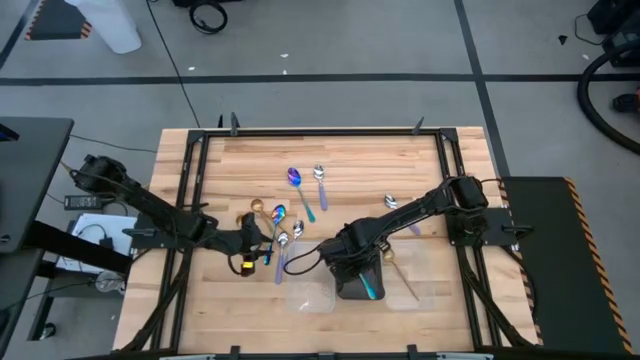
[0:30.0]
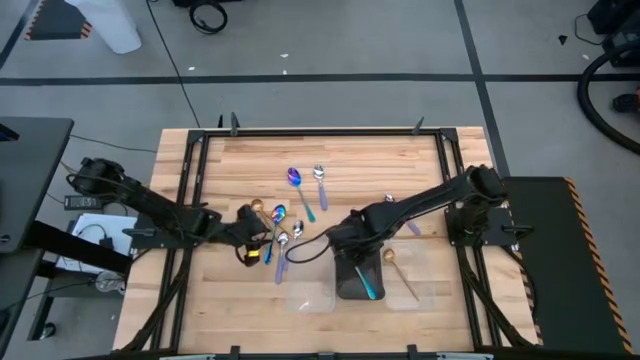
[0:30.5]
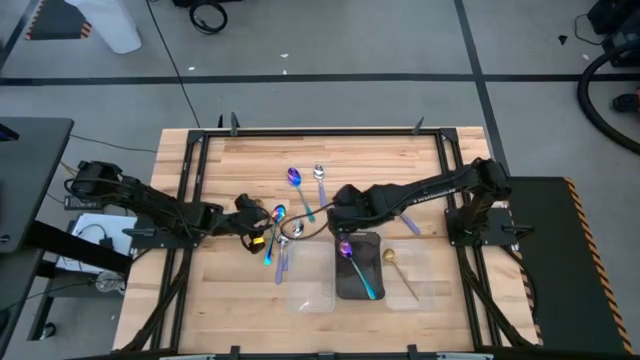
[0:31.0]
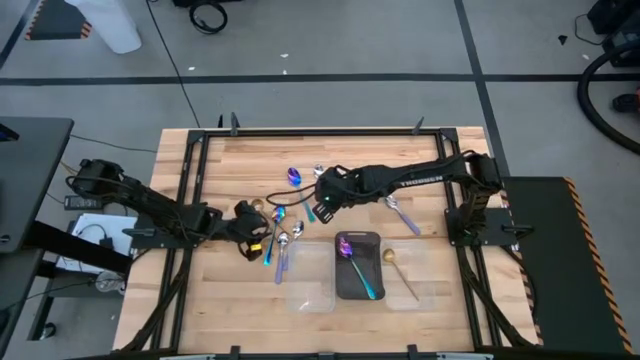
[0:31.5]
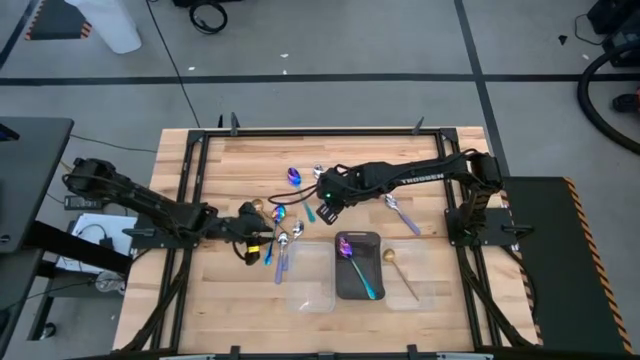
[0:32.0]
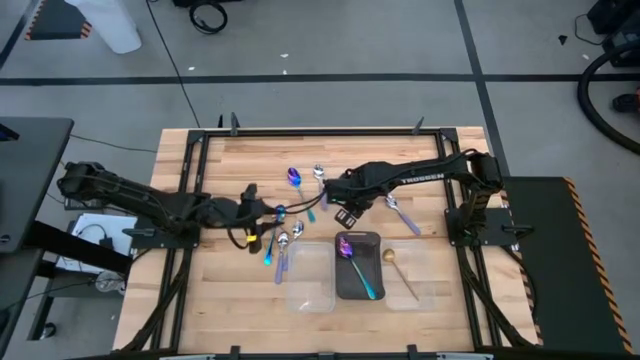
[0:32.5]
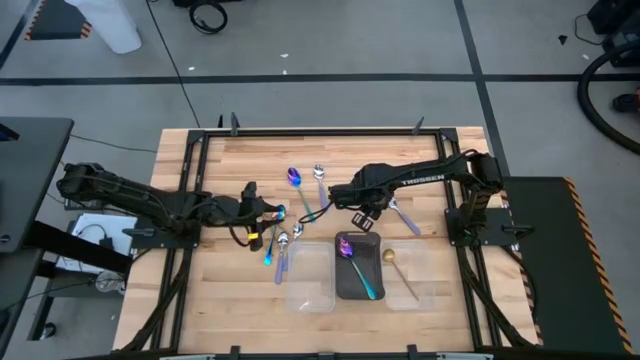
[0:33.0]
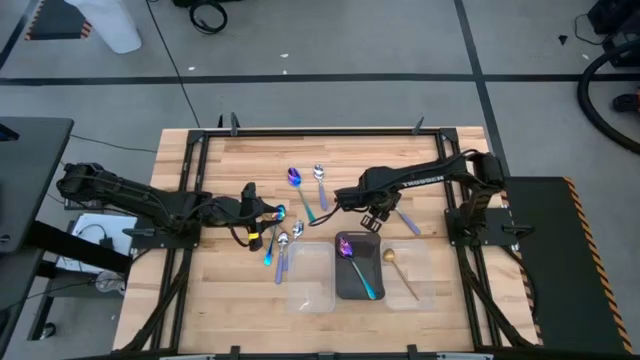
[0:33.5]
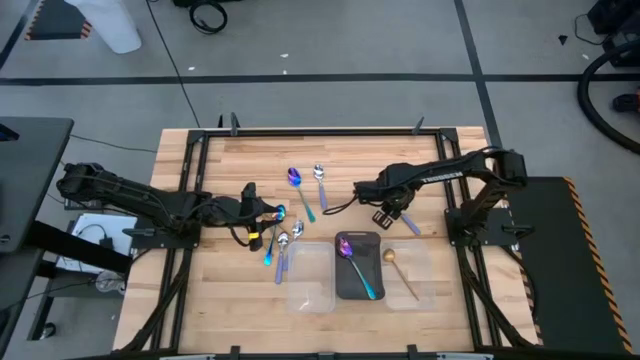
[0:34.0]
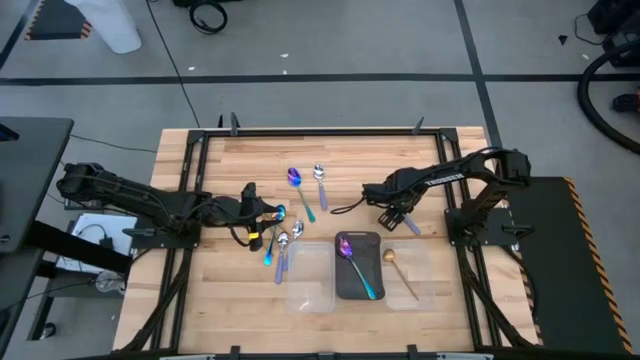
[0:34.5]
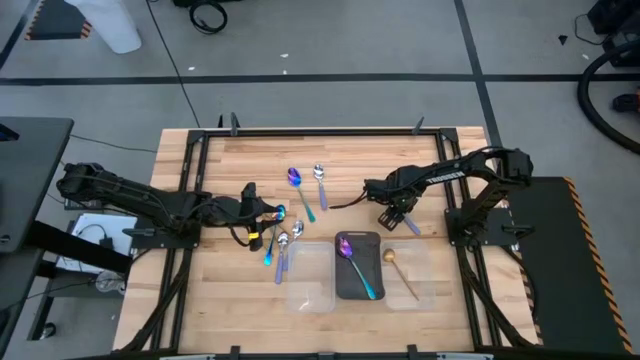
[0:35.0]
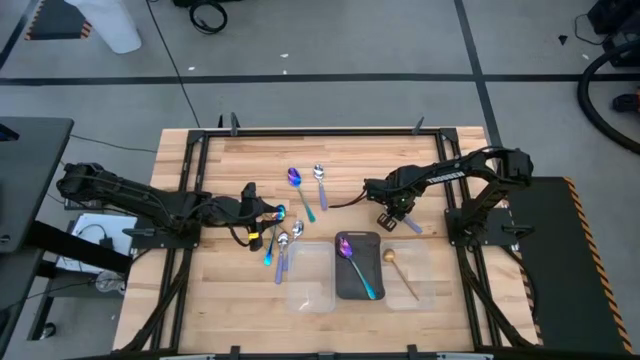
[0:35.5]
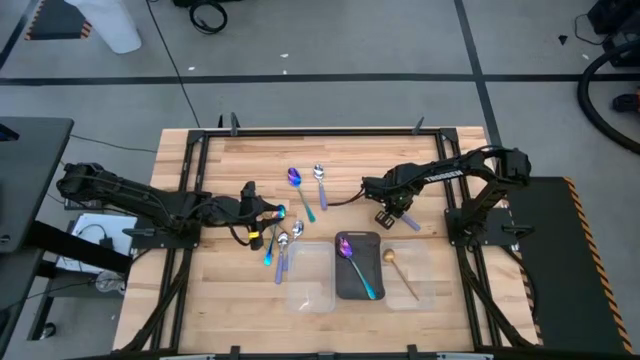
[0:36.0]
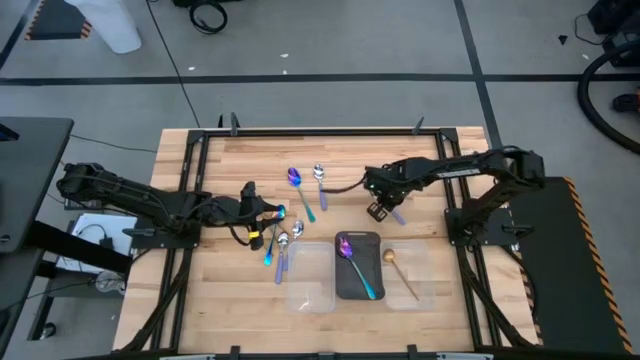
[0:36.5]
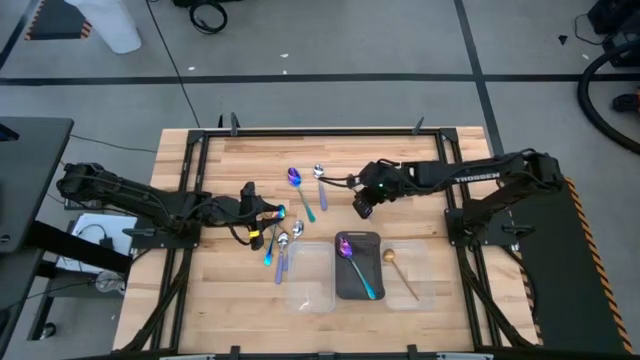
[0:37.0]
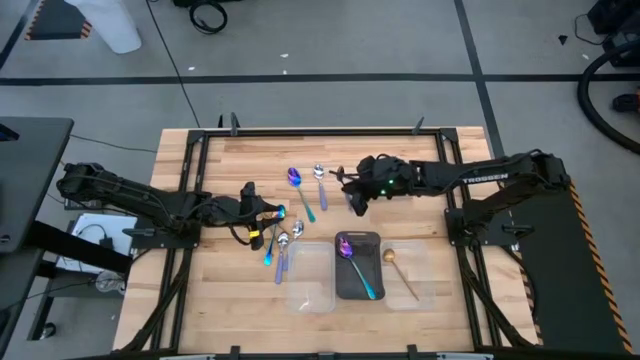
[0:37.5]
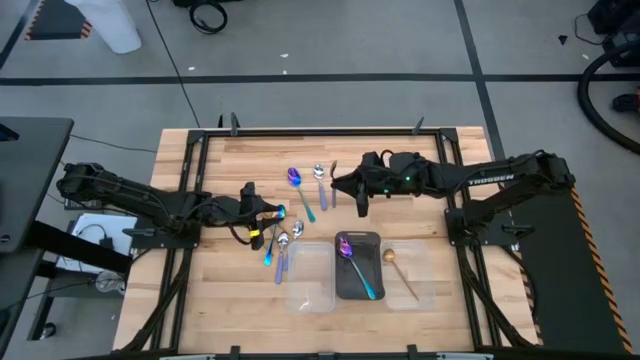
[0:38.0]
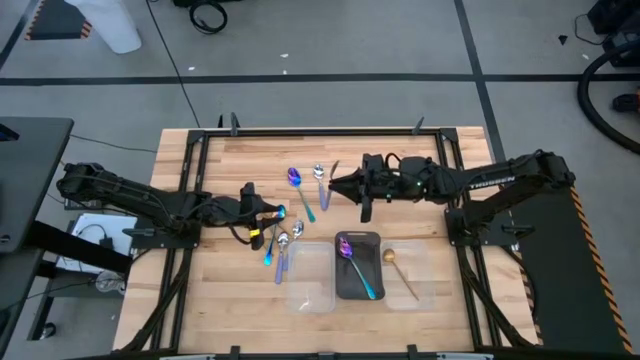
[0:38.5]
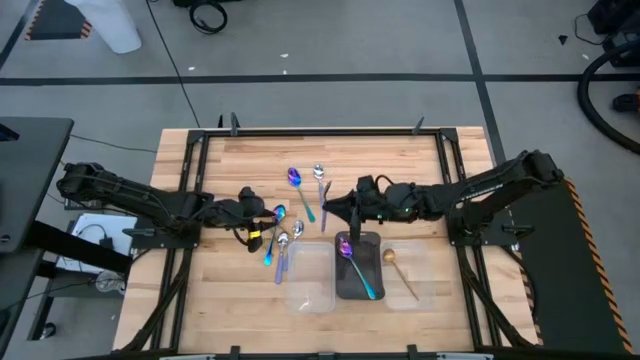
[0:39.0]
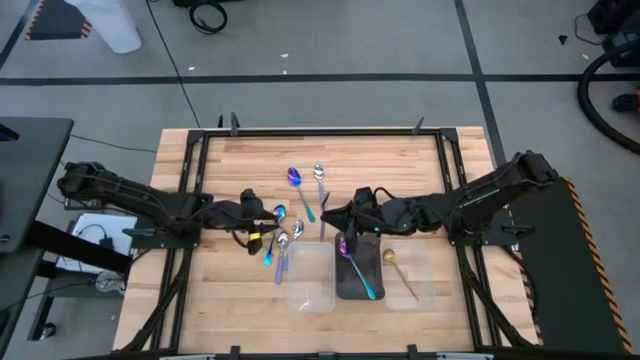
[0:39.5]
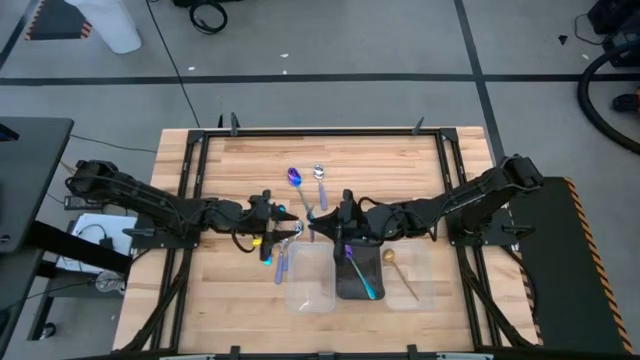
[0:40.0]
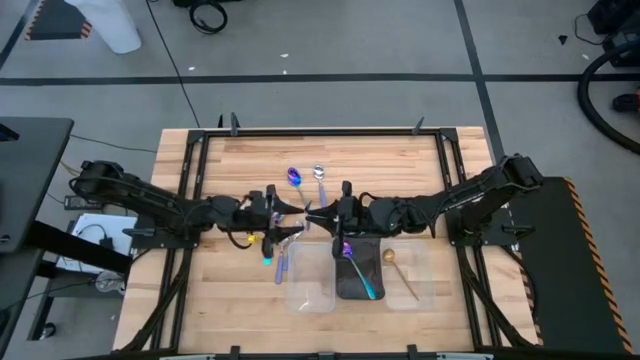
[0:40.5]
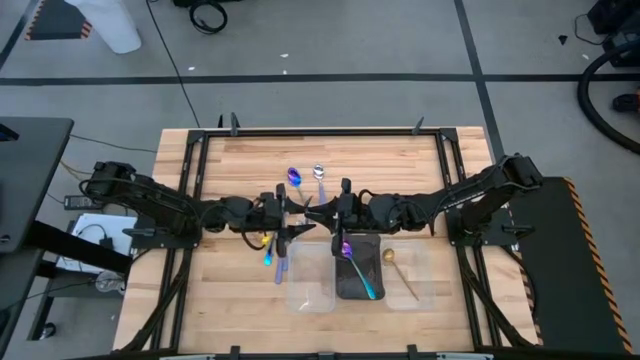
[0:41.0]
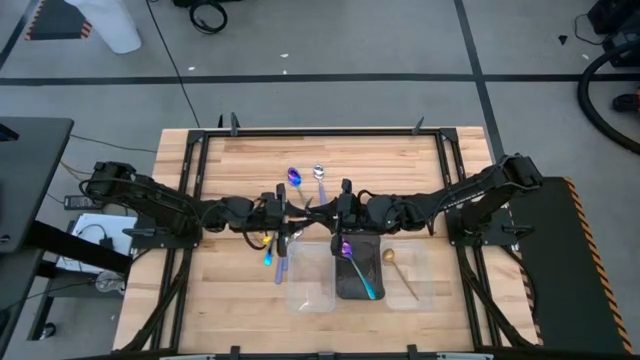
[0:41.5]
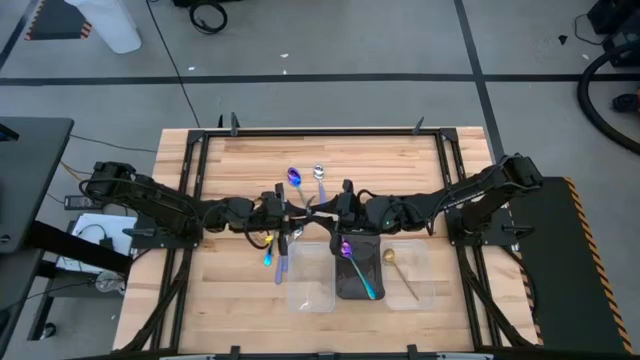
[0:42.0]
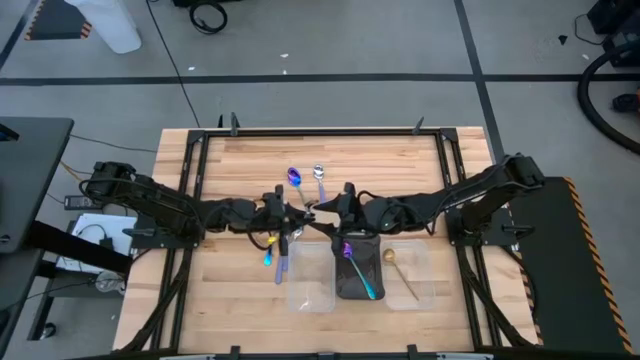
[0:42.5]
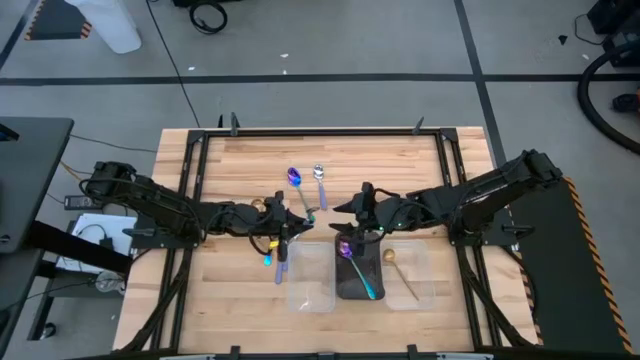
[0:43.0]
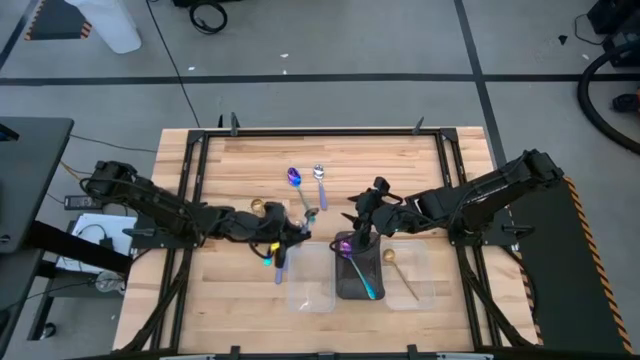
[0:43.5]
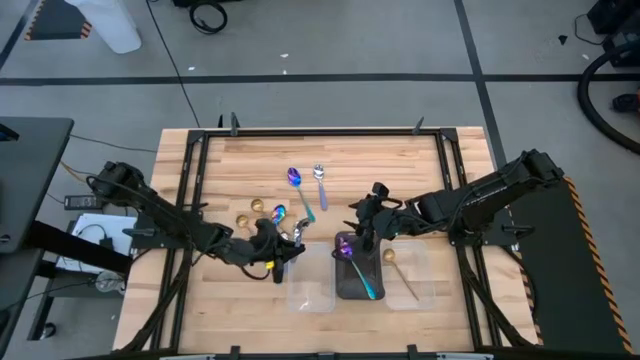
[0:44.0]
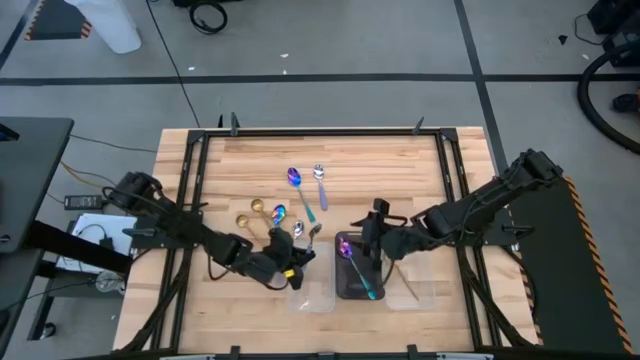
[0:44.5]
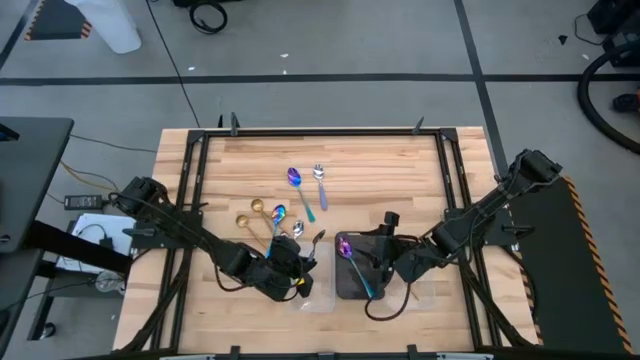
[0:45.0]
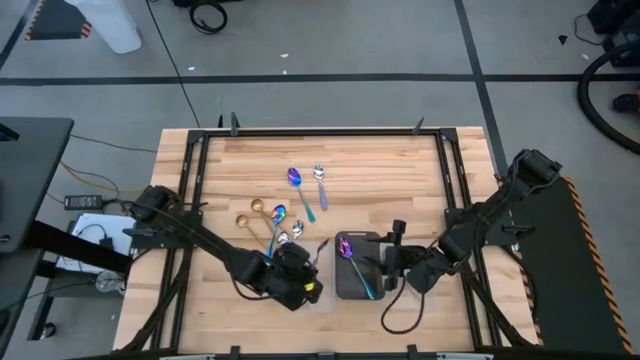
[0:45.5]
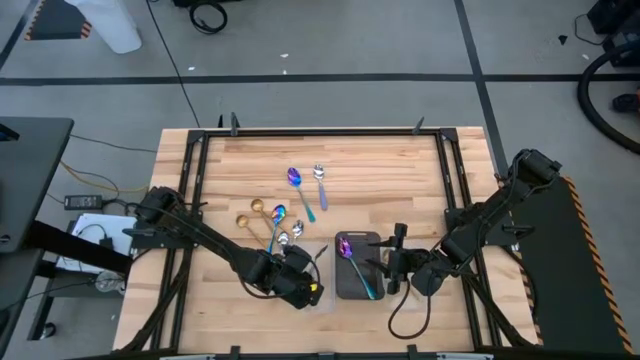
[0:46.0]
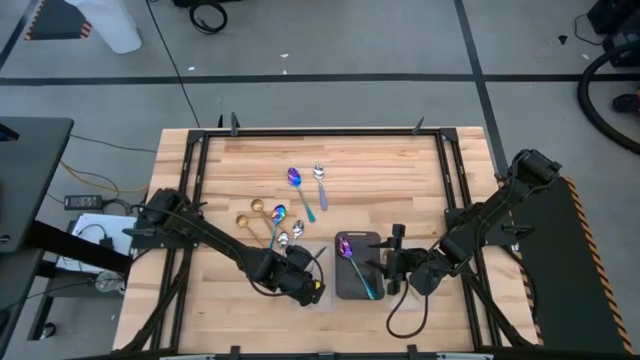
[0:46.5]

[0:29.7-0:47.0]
Task: Sort silverware by color (type)
Put the purple into the left transparent bin

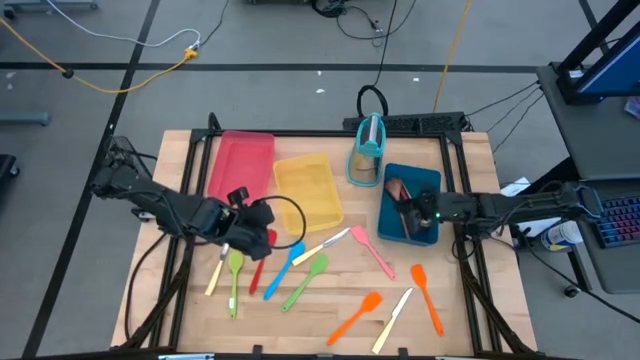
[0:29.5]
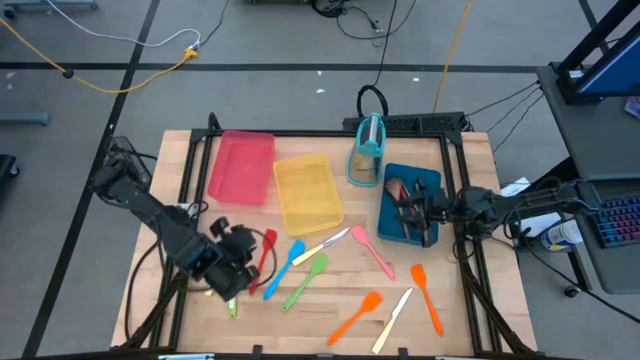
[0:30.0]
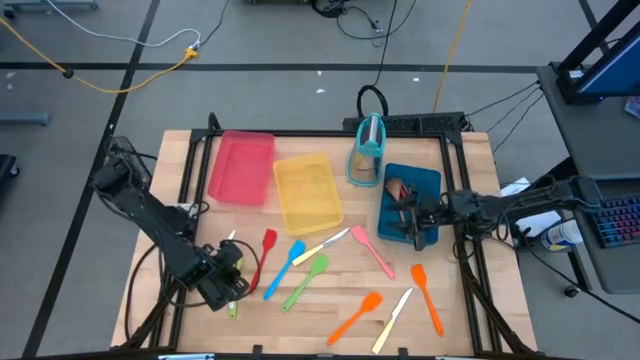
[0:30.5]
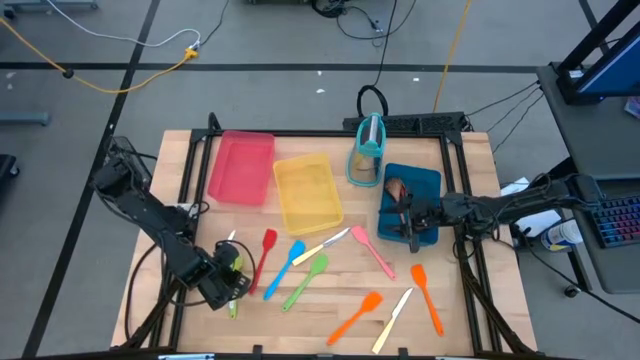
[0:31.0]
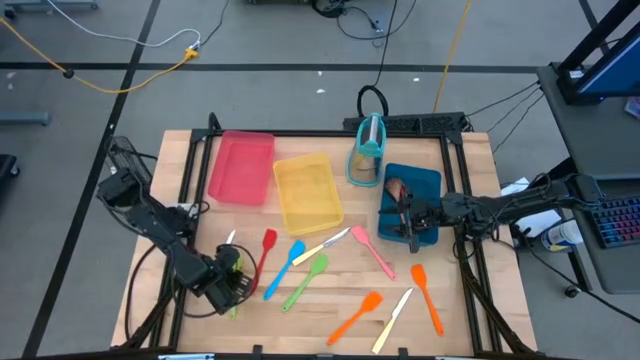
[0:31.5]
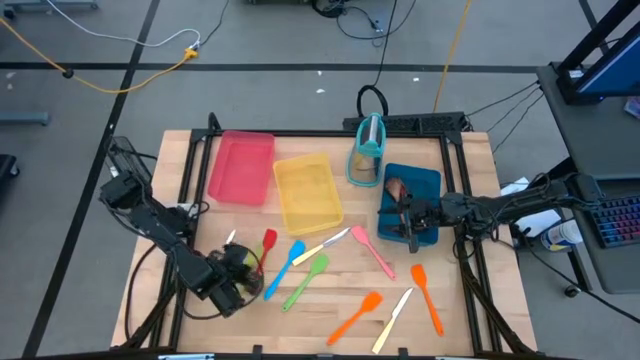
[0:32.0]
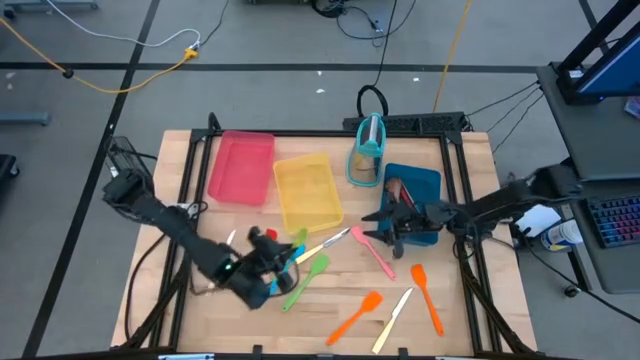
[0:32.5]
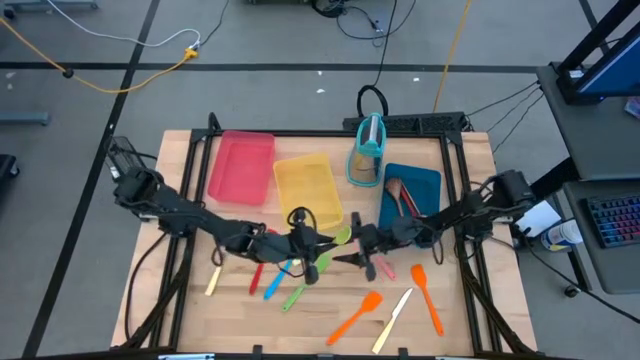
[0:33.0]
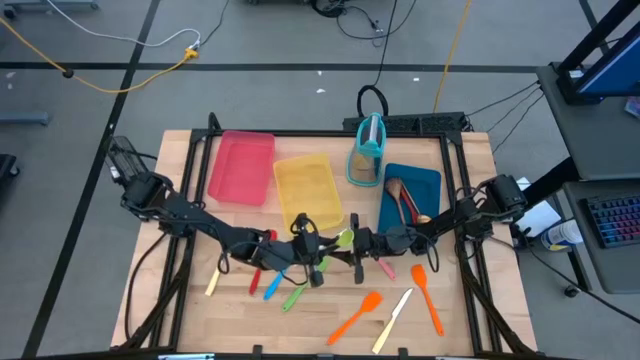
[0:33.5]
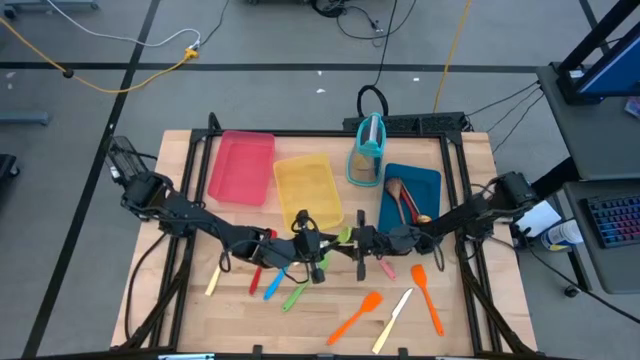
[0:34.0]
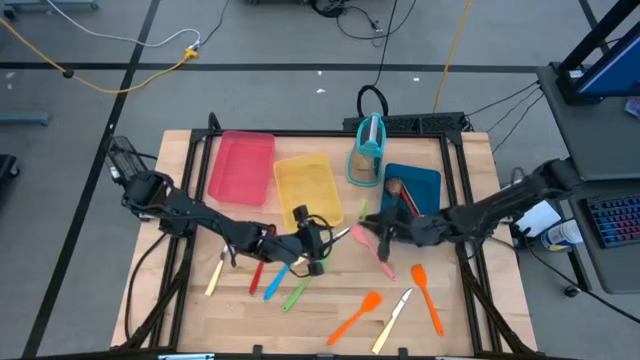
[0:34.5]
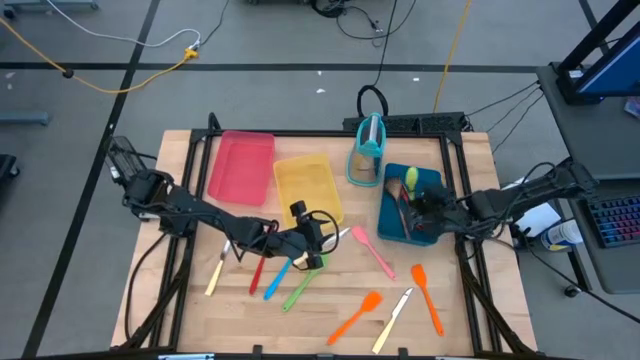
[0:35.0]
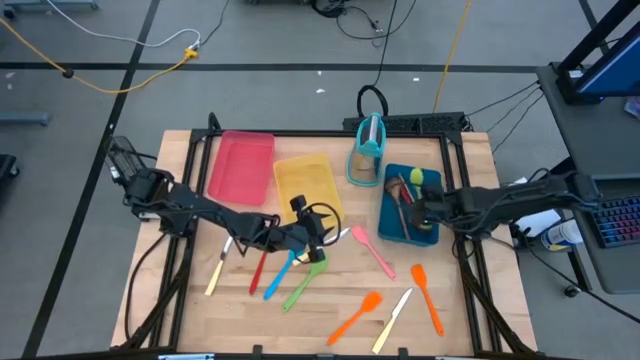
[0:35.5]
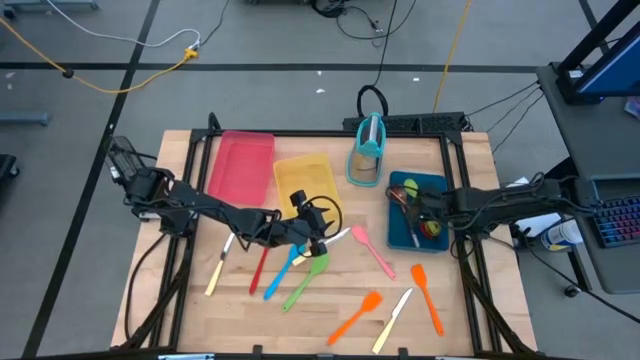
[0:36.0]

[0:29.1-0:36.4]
Task: Pick & Place Kitchen Items
Put the green serving spoon into the blue bin
